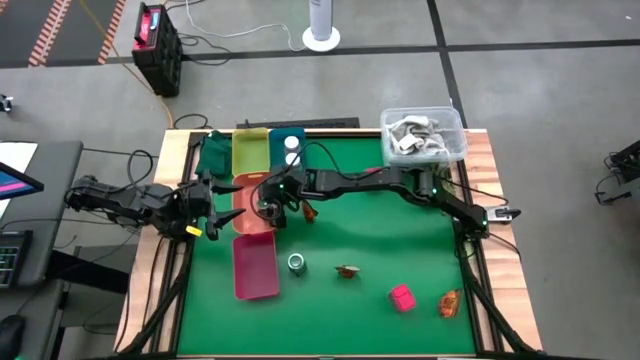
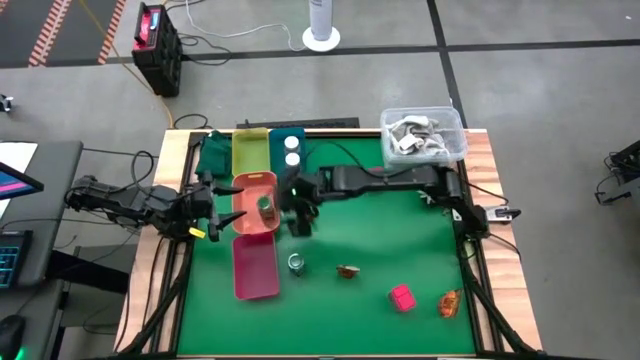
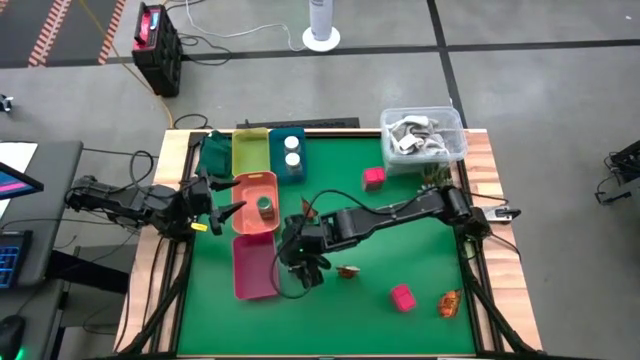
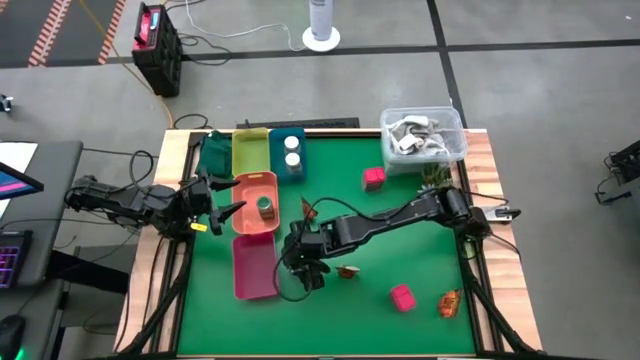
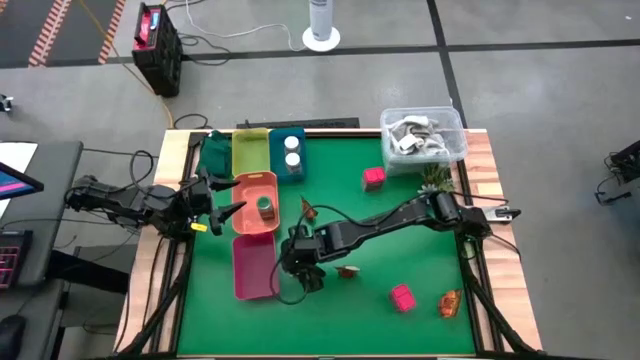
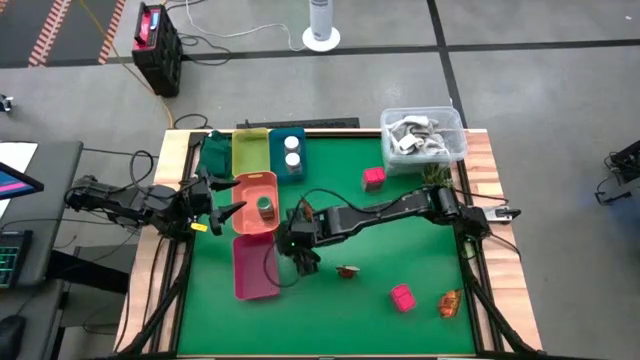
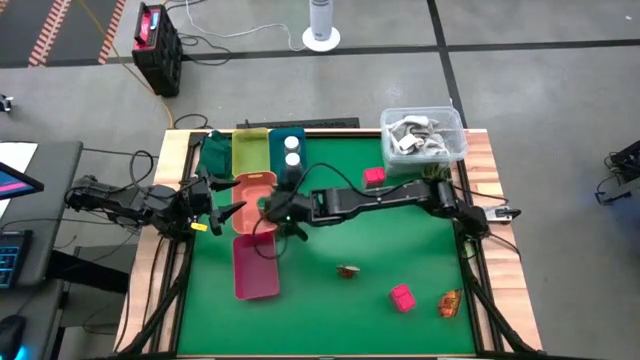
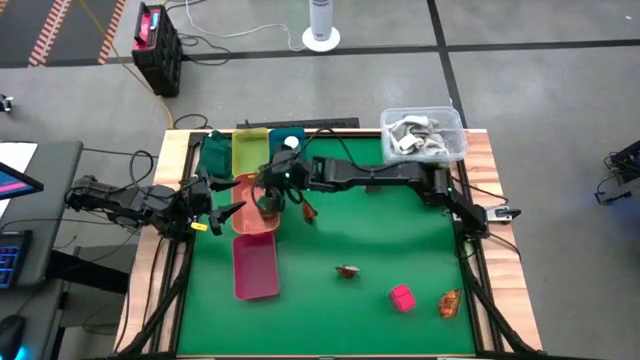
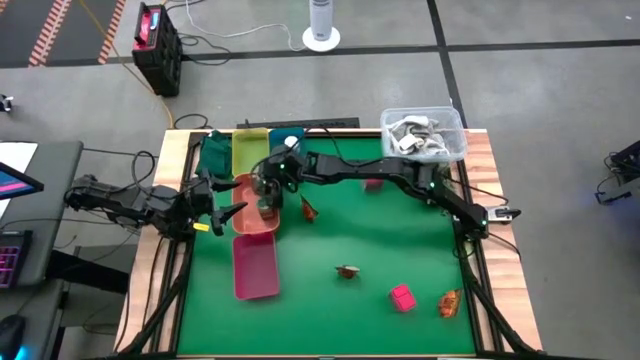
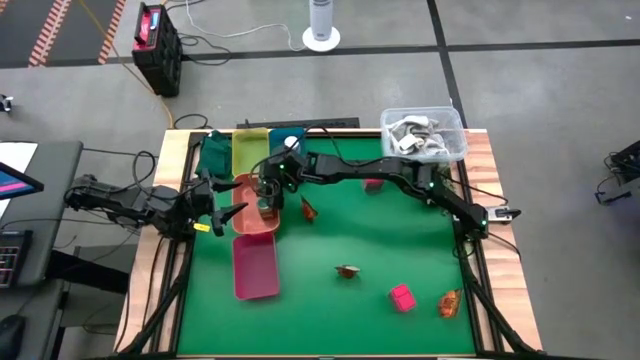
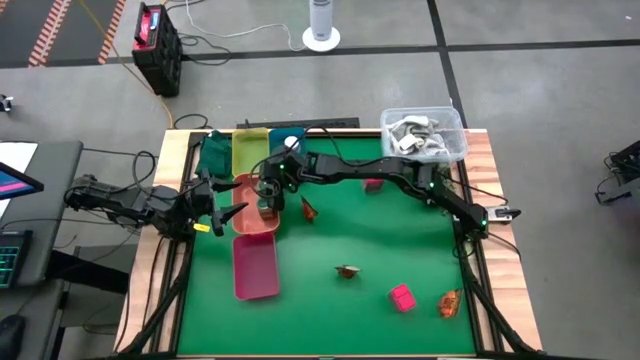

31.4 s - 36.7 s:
Task: Sort spices by type
Put the green seasoning bottle into the orange bin

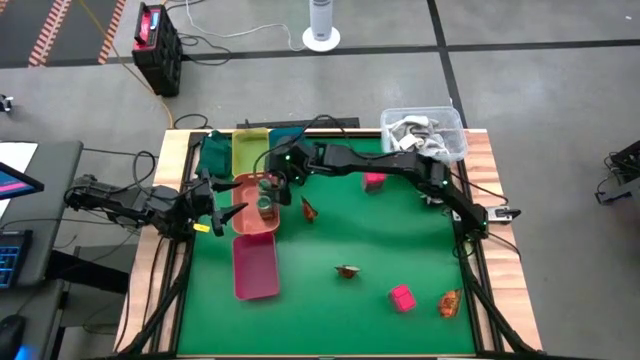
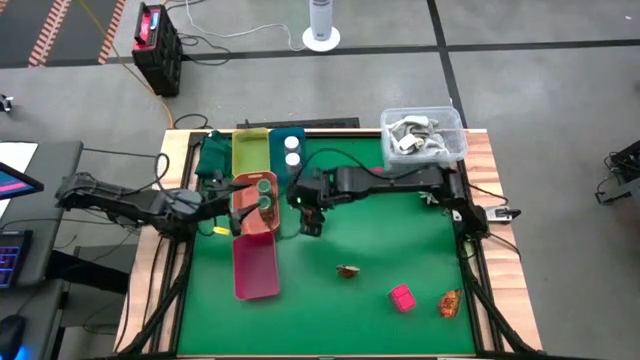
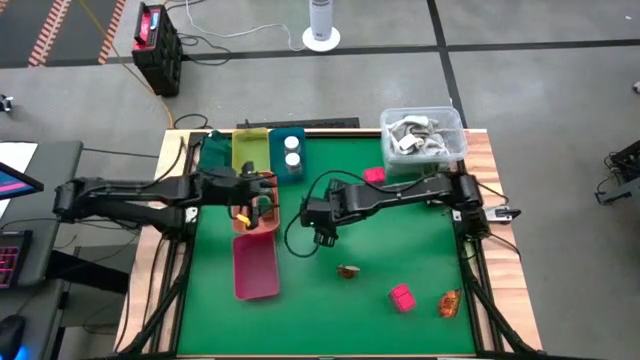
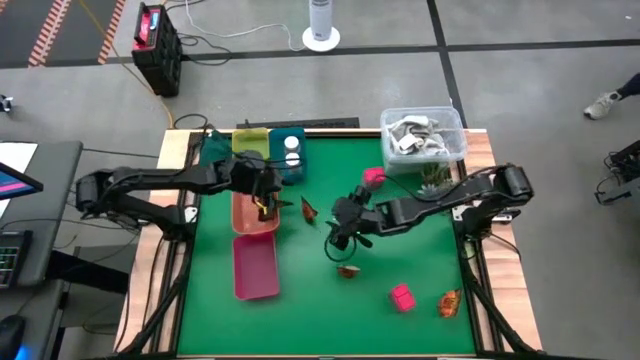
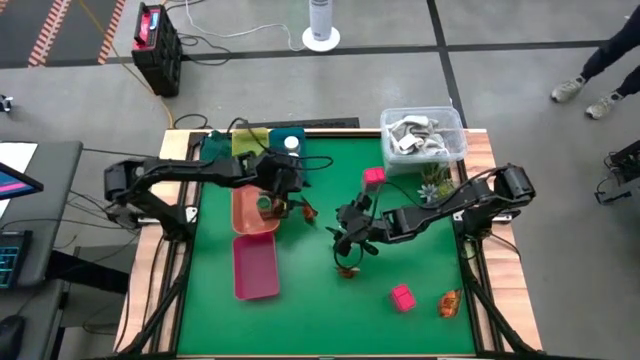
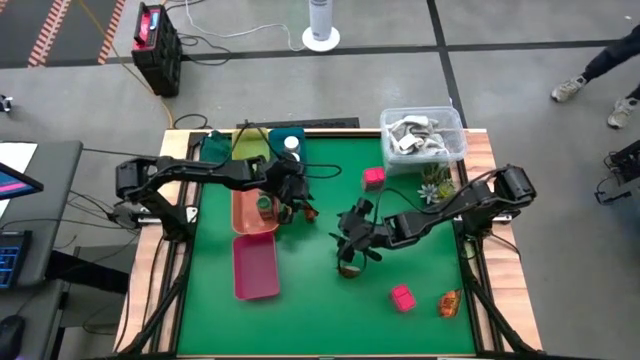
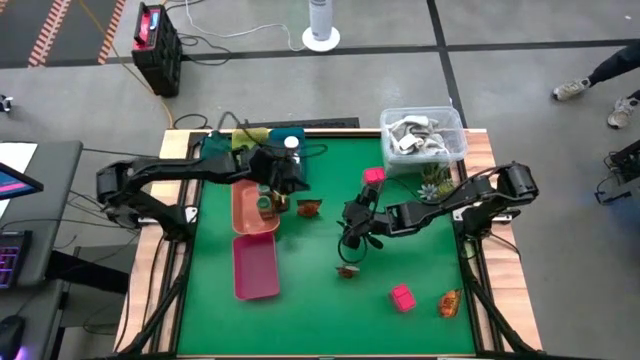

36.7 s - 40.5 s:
Put the top orange seasoning pack into the yellow bin

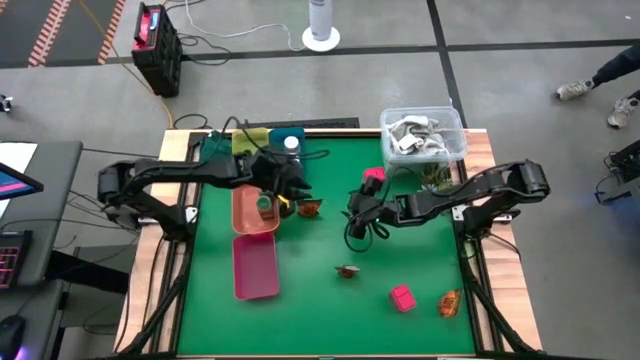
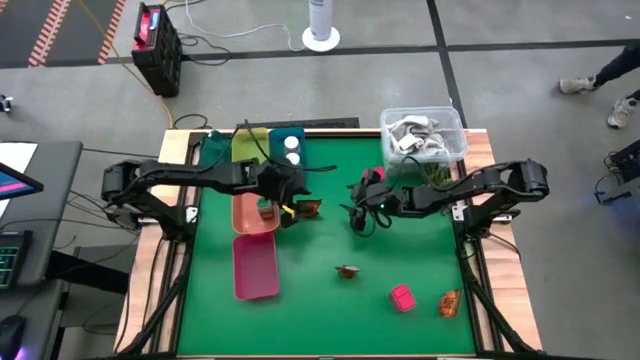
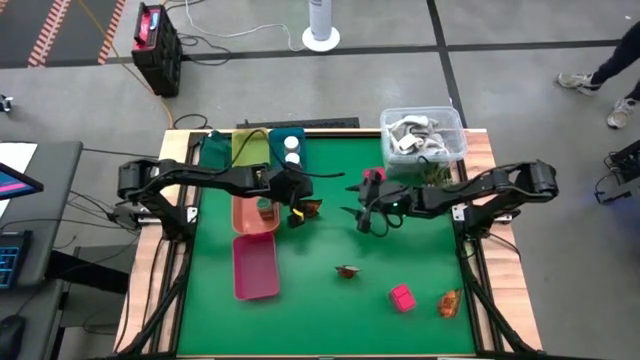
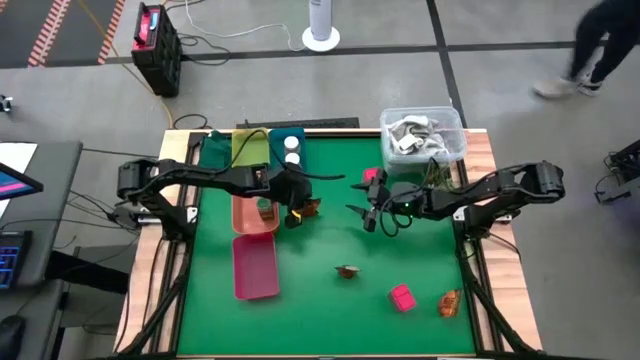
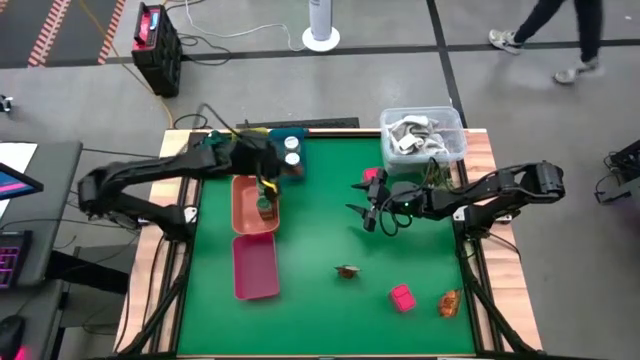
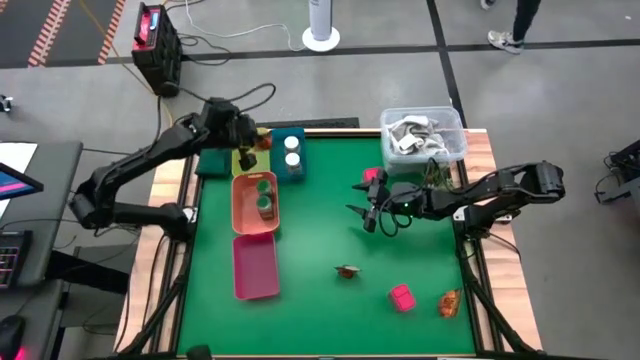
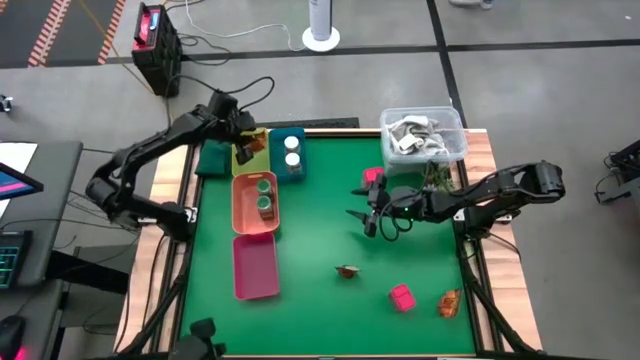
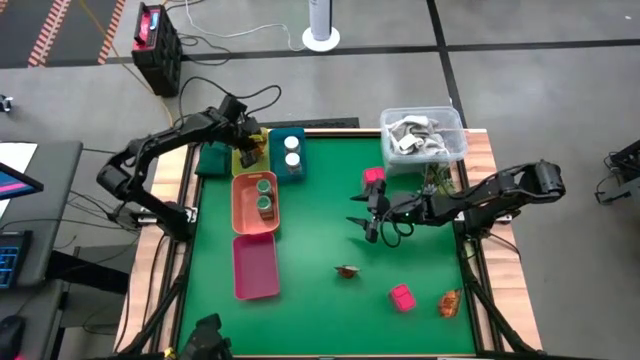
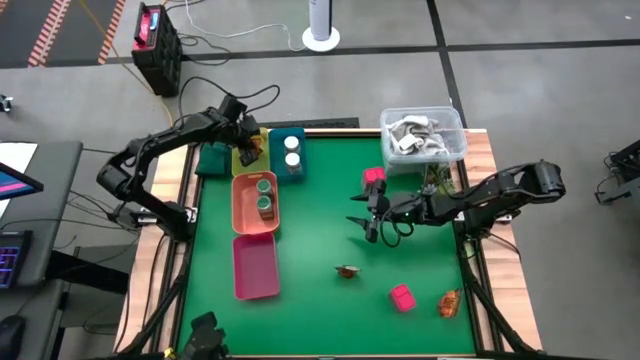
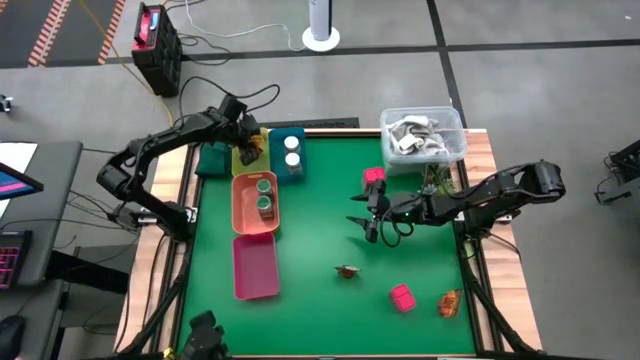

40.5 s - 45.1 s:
Put the top orange seasoning pack into the yellow bin

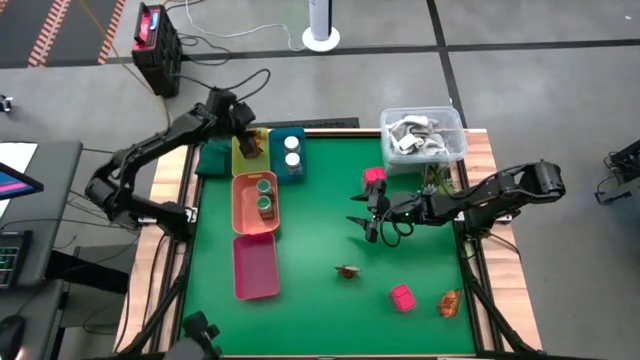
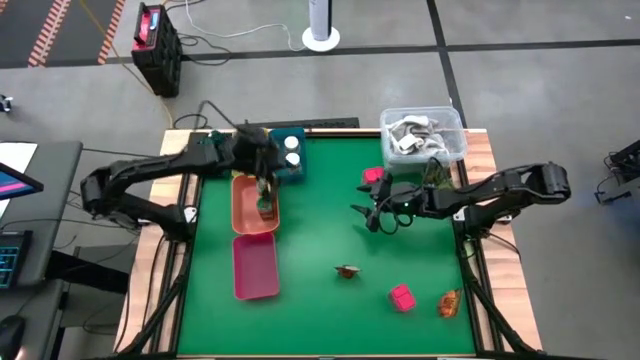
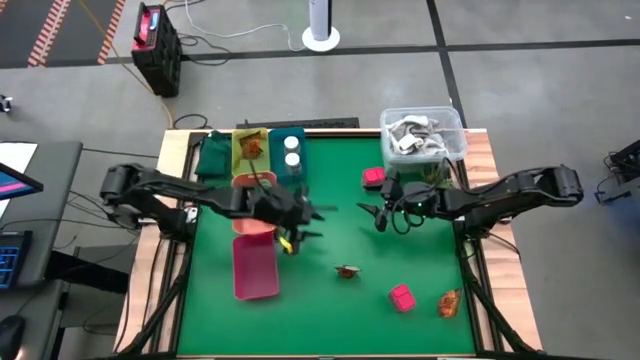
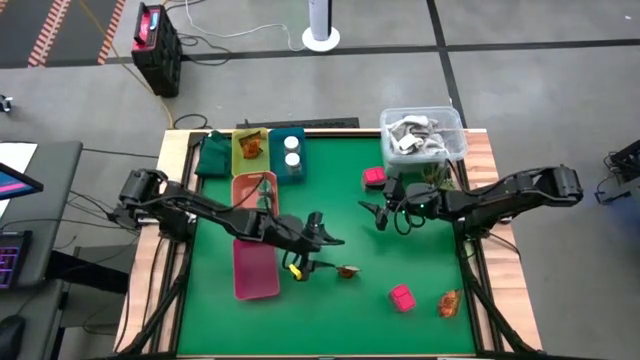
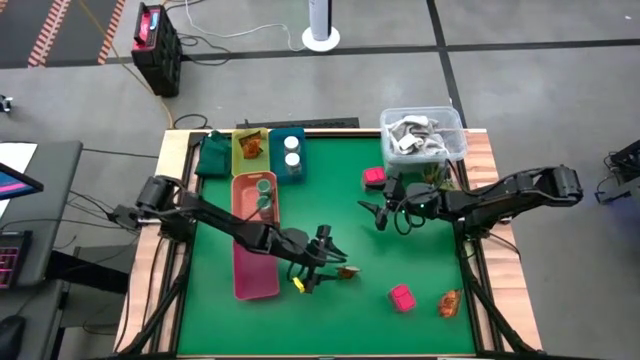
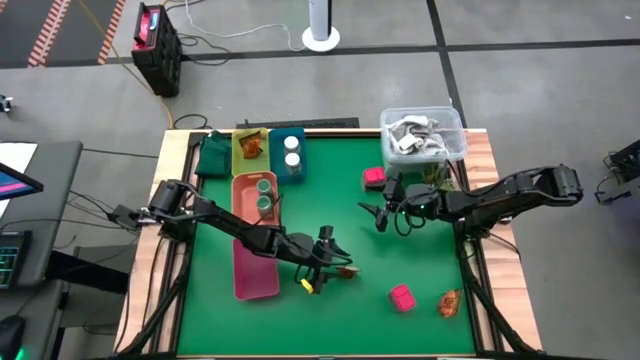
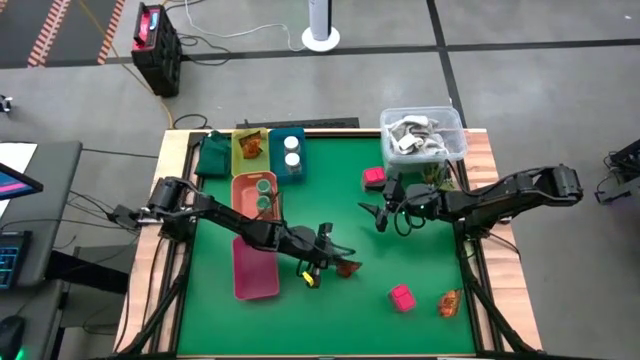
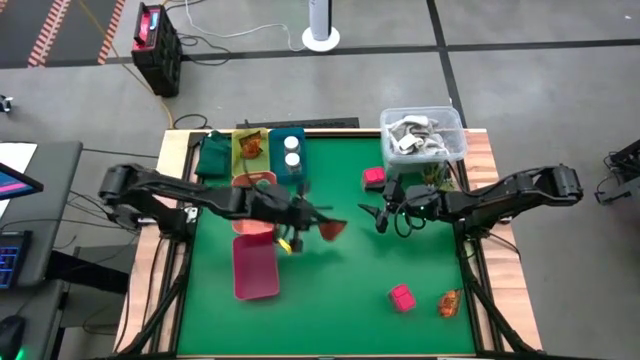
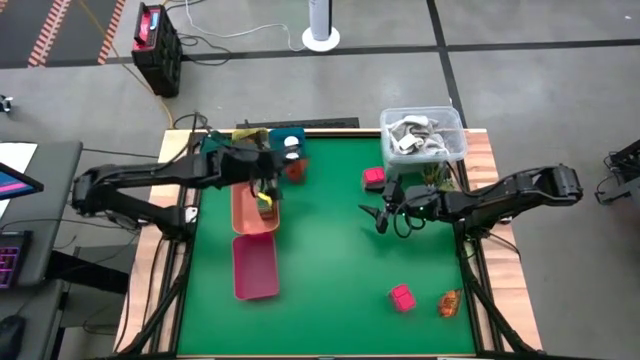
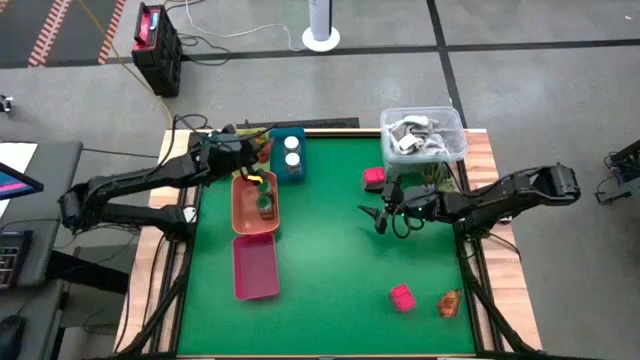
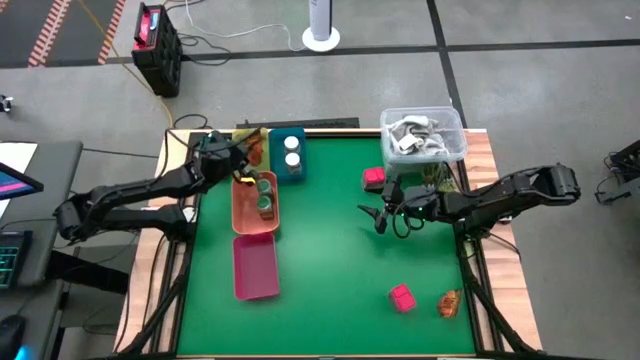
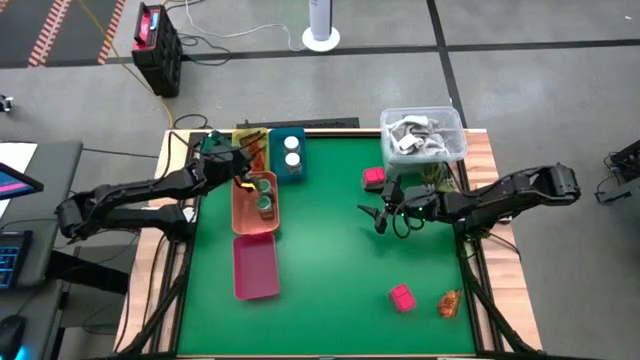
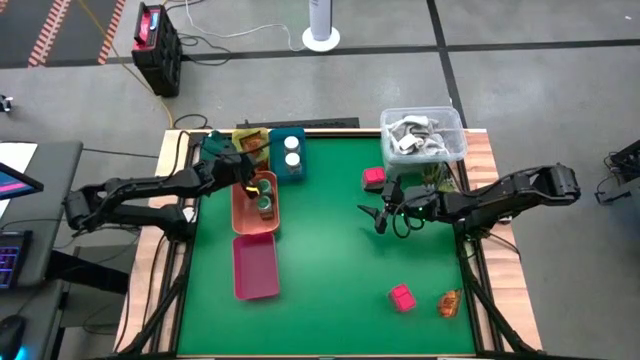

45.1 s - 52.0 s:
Put the top orange seasoning pack into the yellow bin

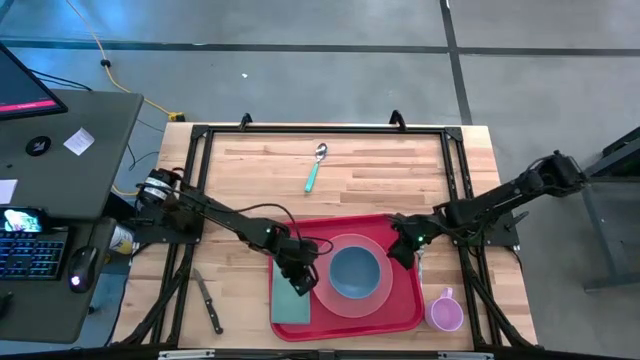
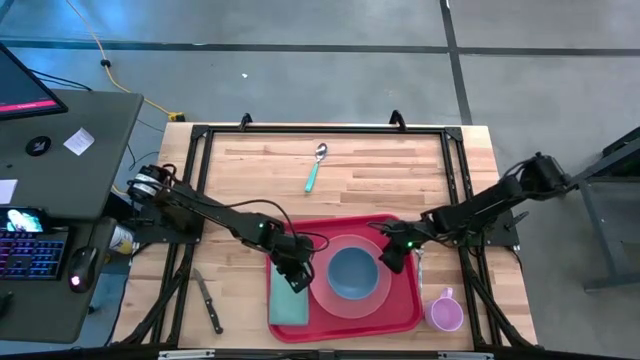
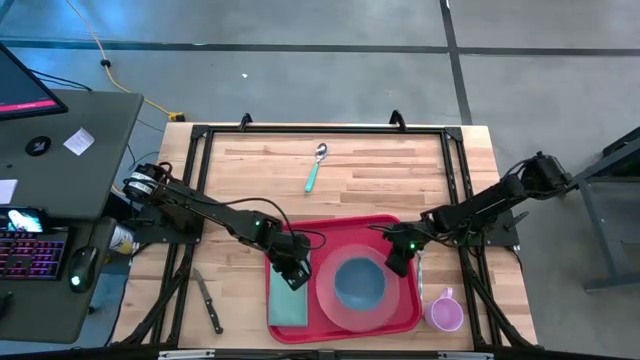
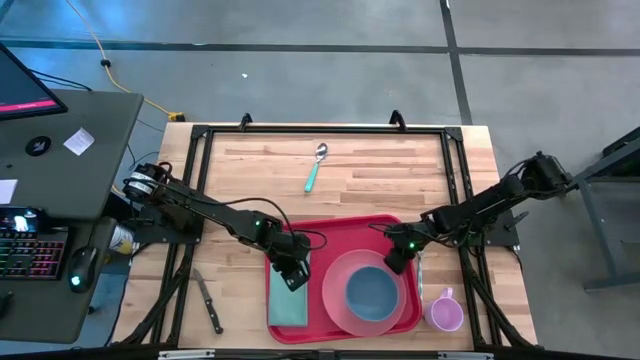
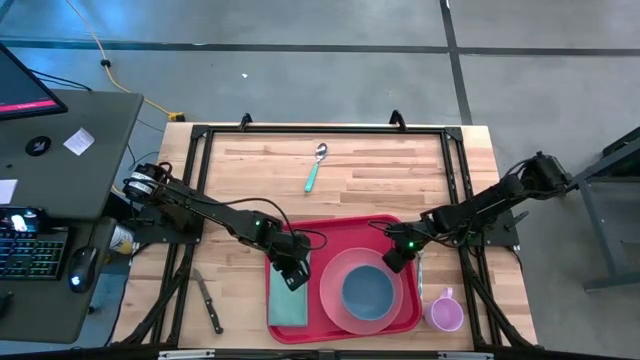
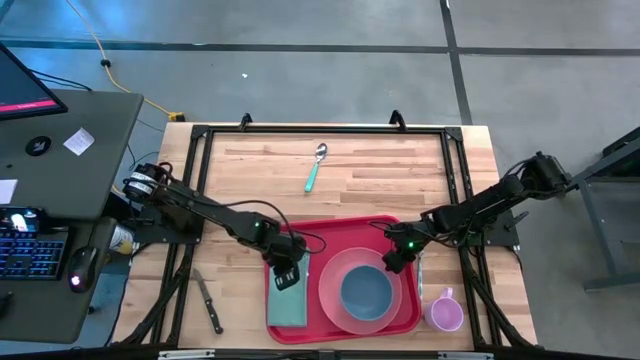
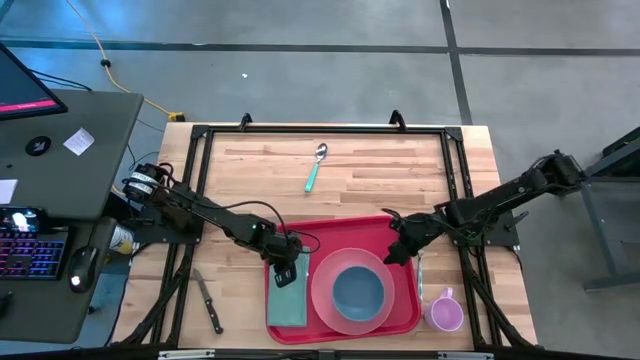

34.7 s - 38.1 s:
Task: Set up tray
Adjust the pink plate on the red tray
